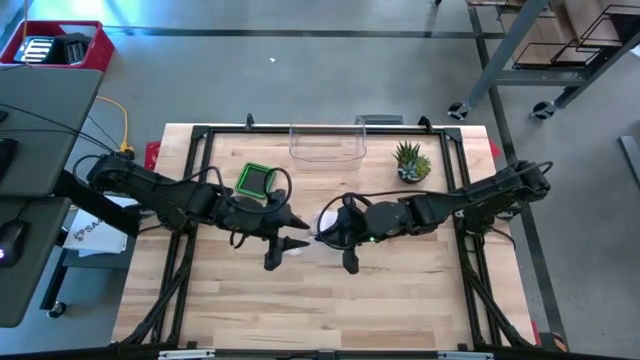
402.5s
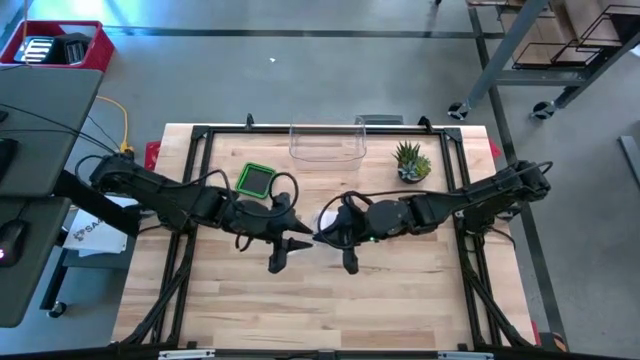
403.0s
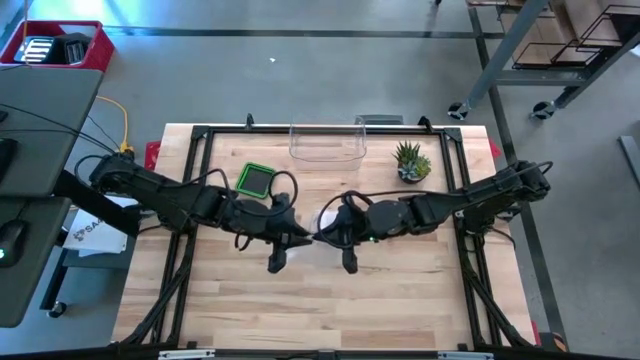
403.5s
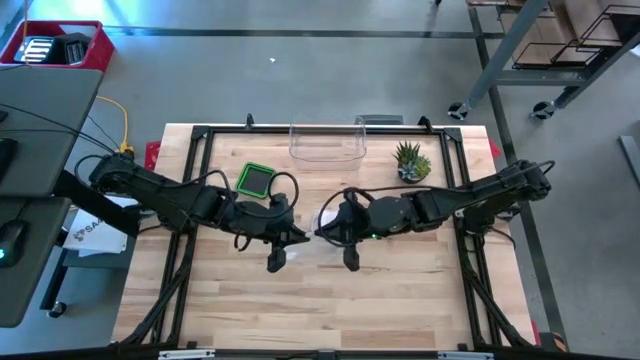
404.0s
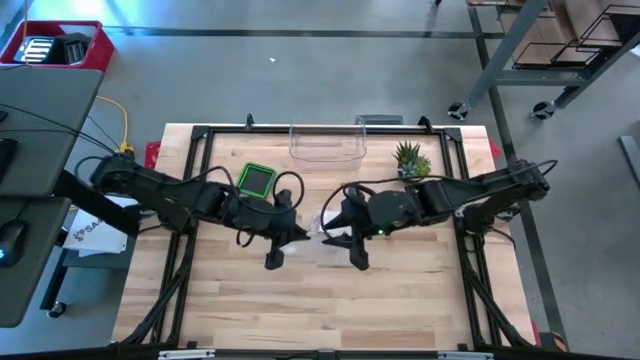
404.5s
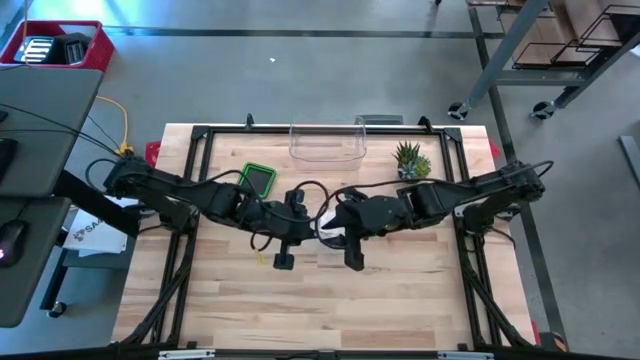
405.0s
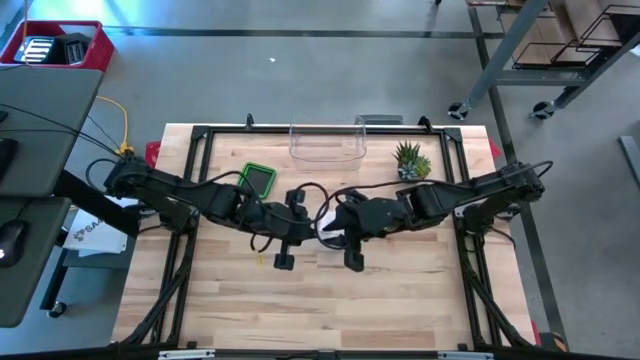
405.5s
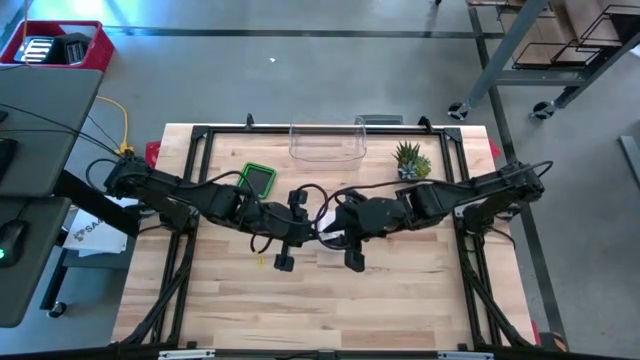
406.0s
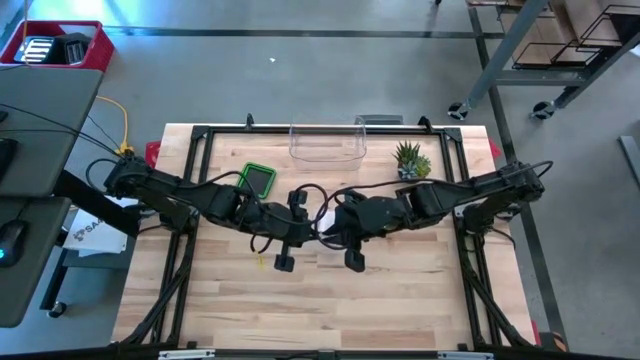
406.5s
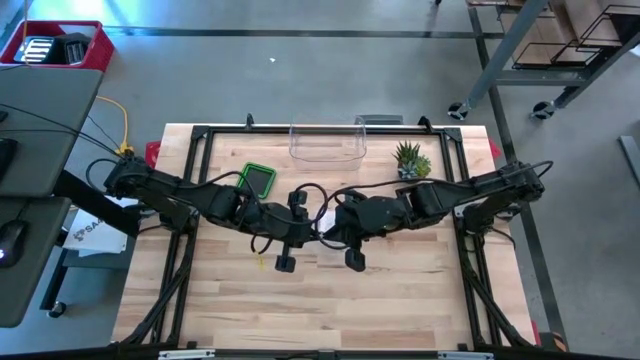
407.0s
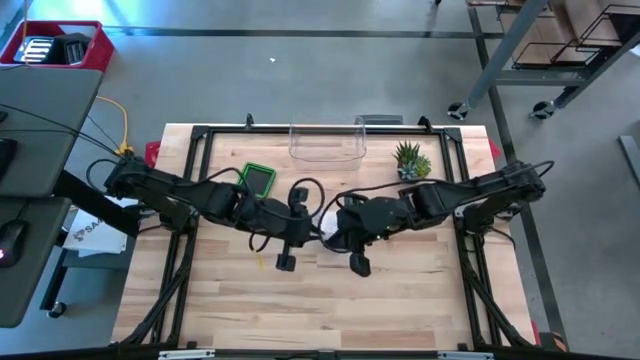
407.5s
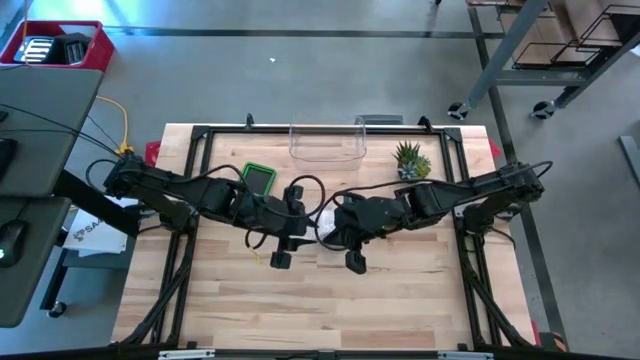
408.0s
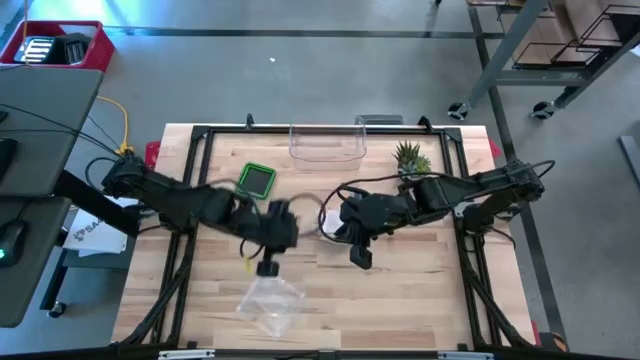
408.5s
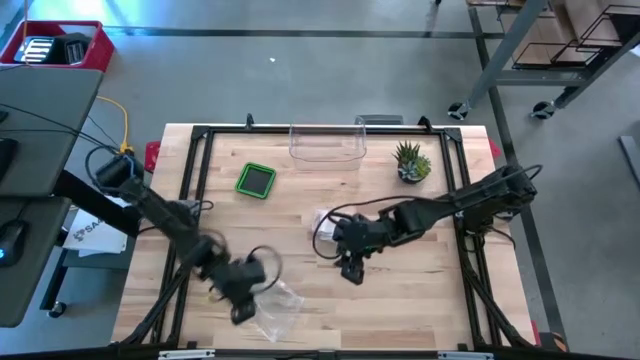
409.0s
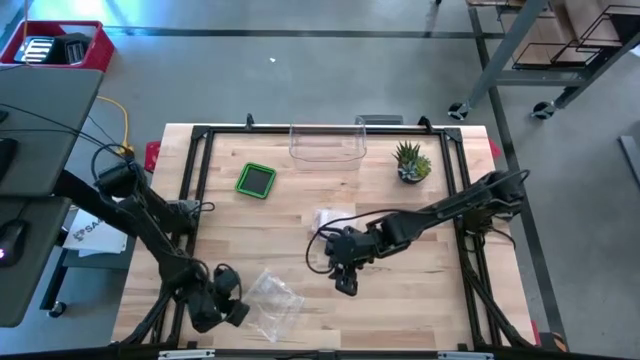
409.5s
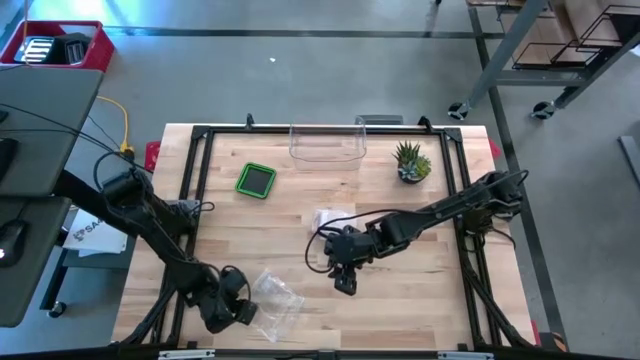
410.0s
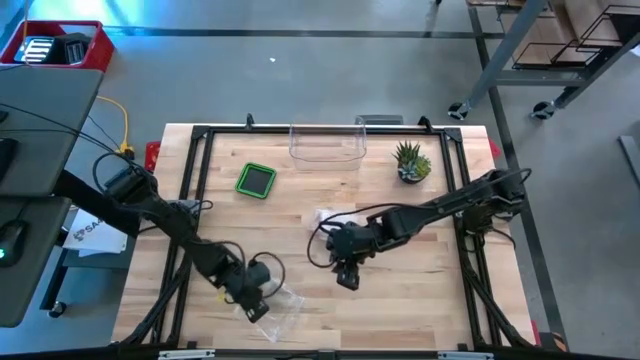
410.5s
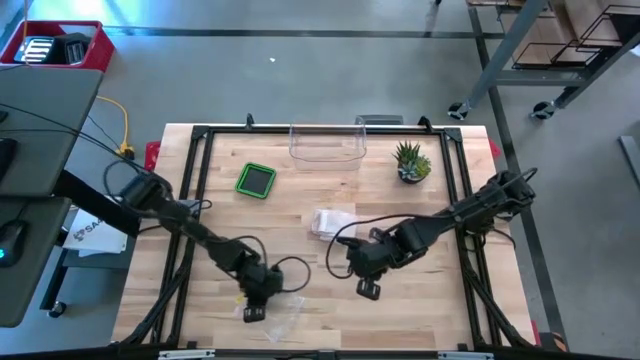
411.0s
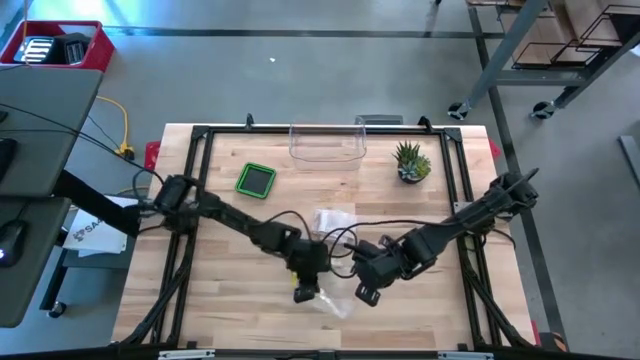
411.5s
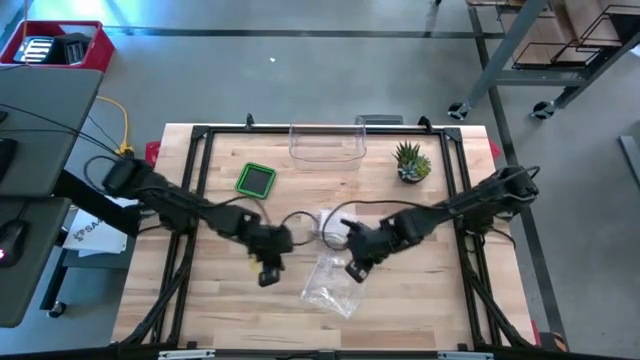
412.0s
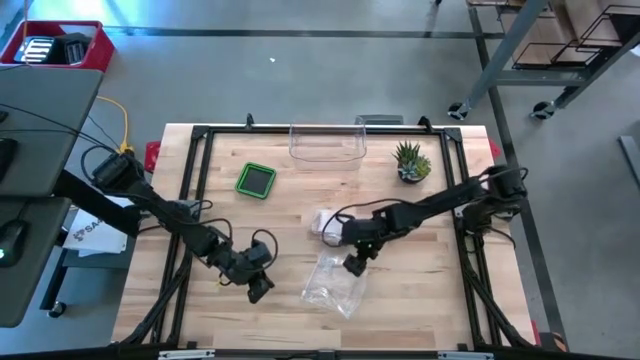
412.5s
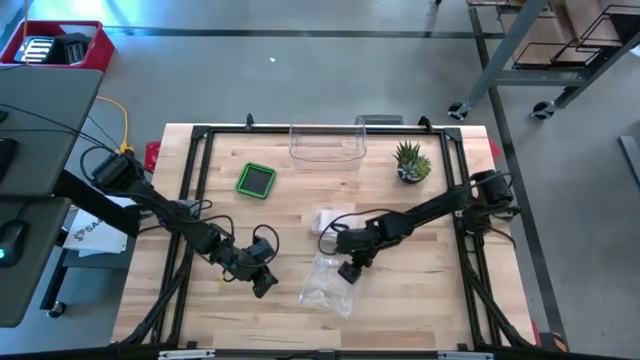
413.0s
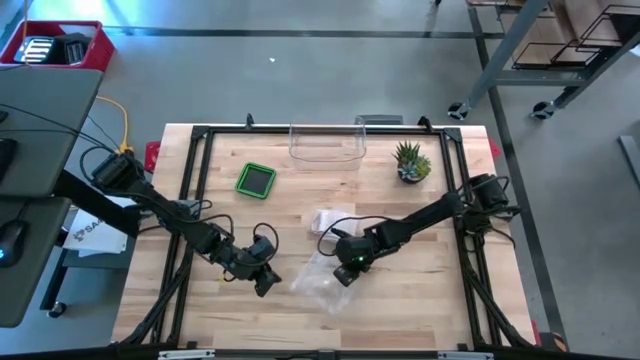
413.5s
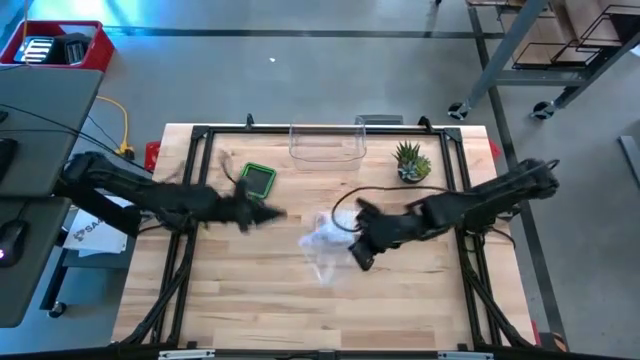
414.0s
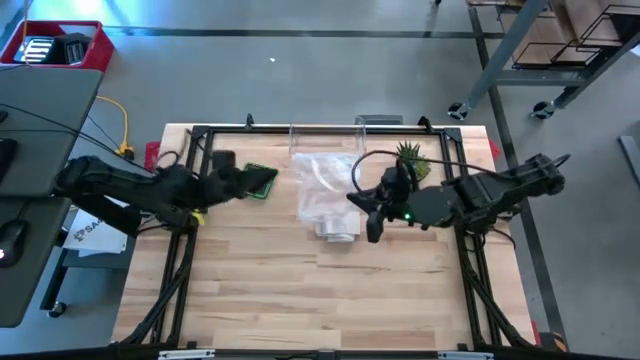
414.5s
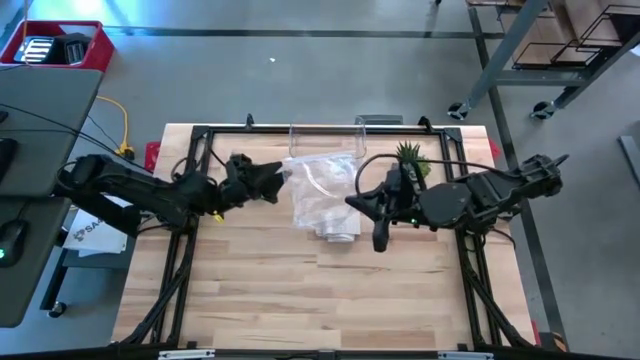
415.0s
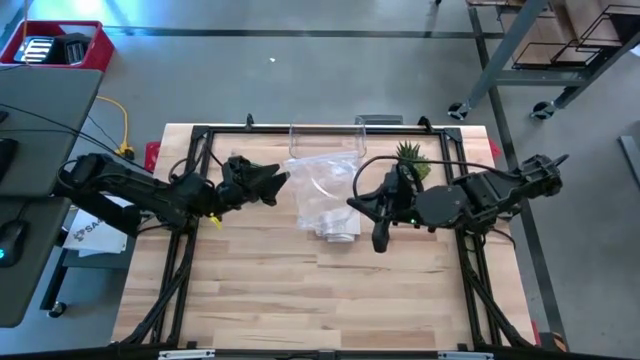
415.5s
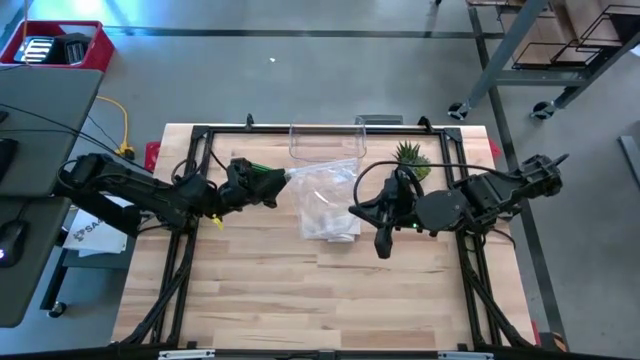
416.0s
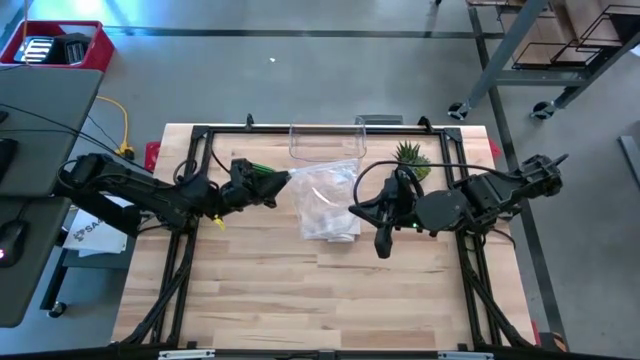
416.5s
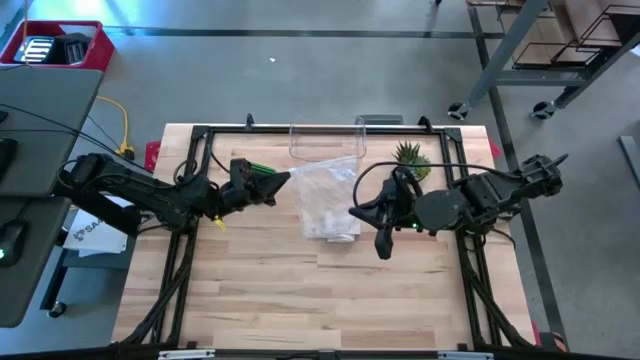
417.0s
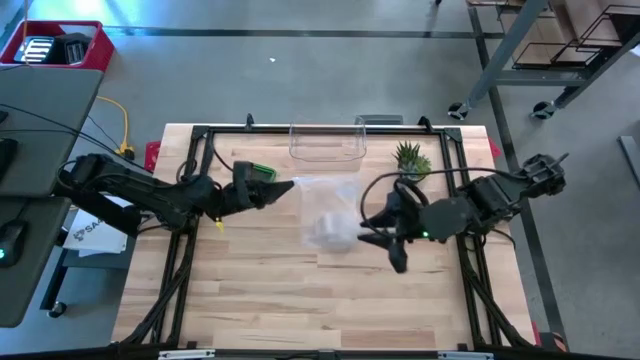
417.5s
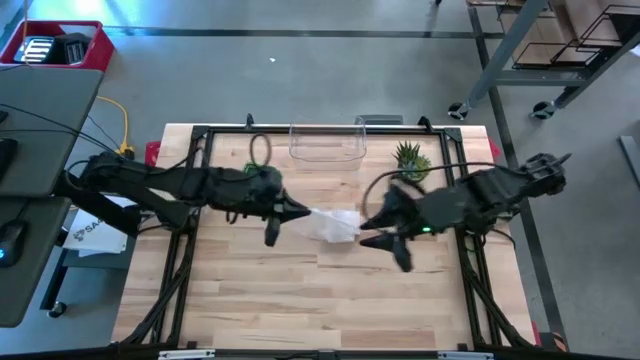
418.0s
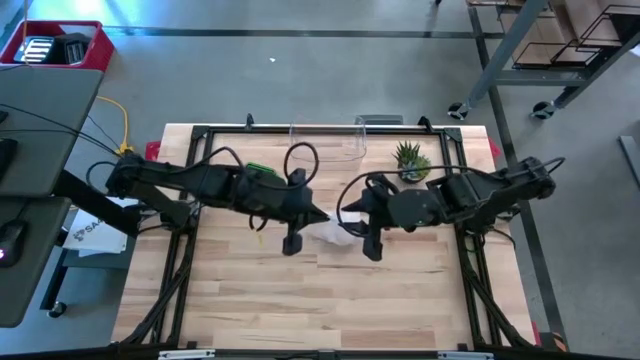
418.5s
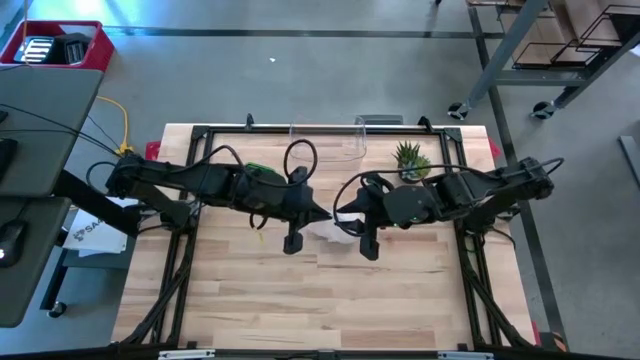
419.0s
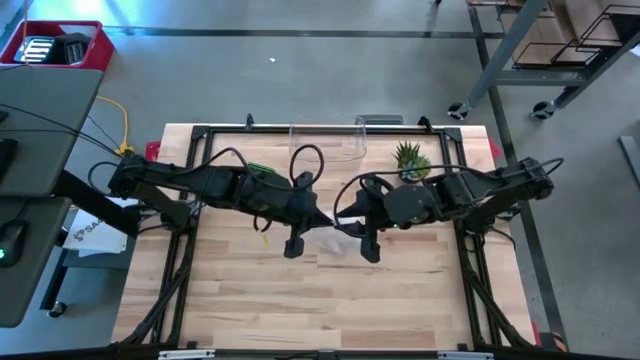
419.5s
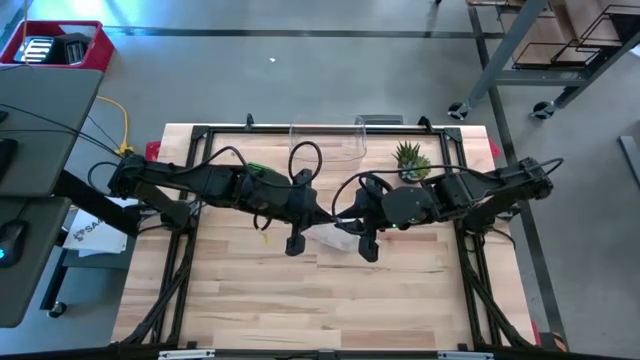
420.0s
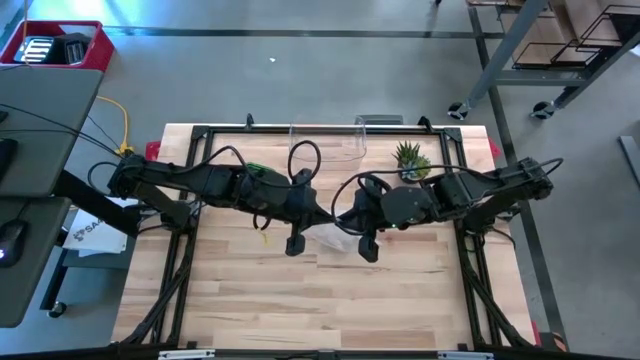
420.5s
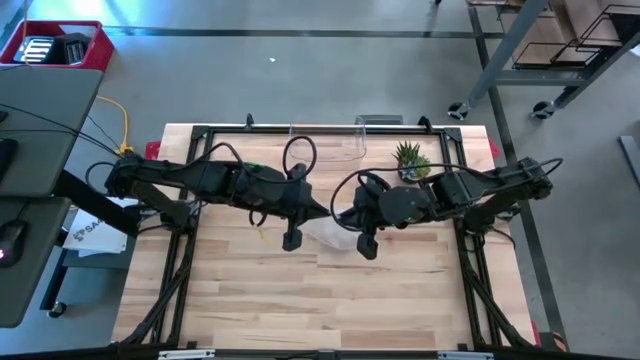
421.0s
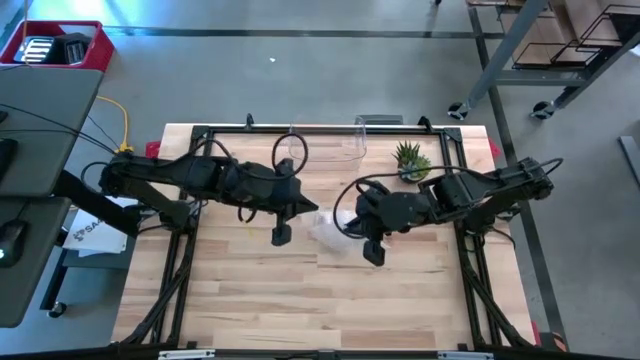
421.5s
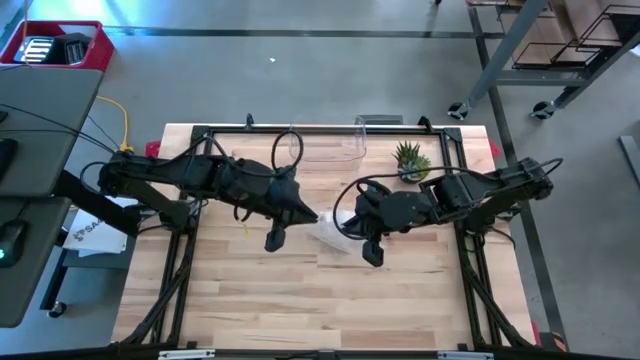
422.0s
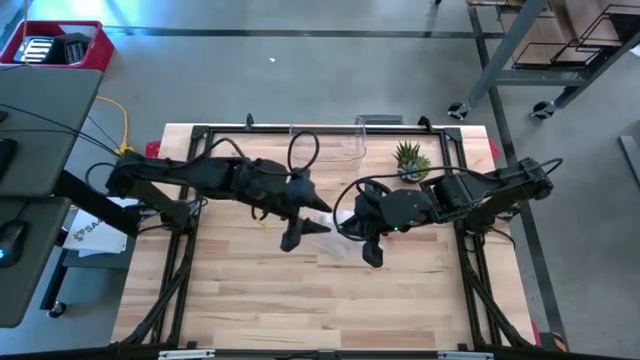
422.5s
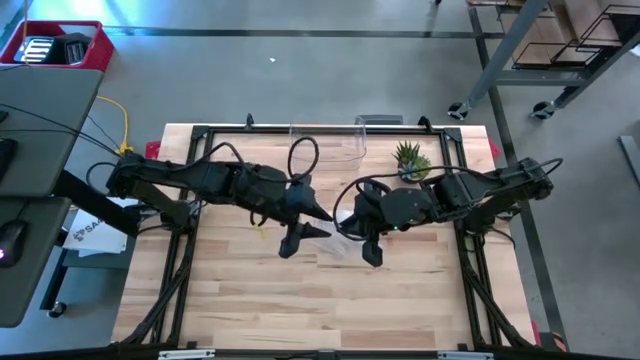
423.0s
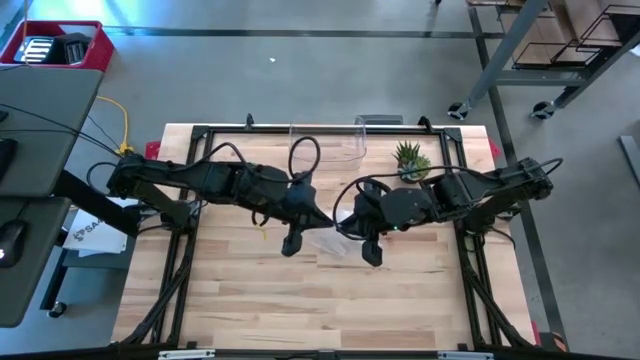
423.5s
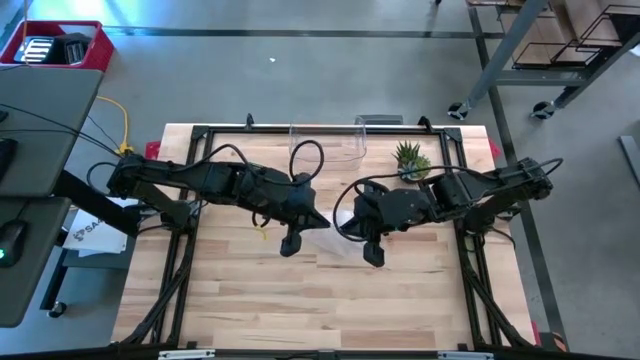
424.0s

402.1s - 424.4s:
Task: Roll bandage
Open the transparent zip bag
